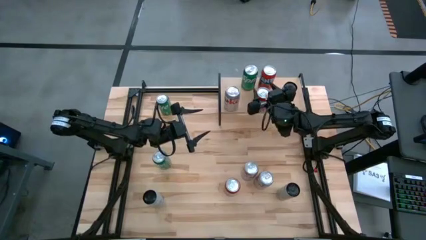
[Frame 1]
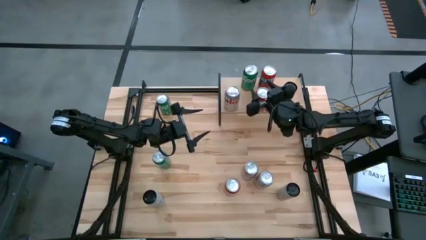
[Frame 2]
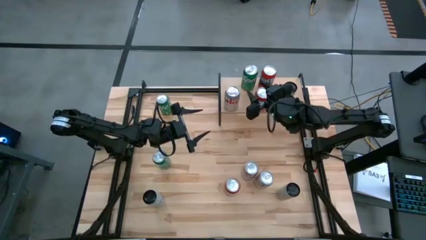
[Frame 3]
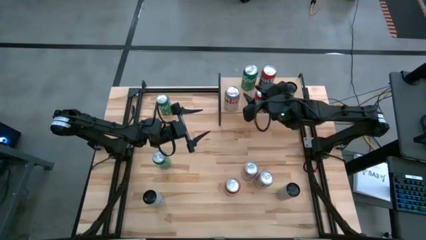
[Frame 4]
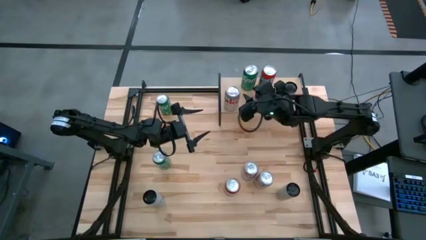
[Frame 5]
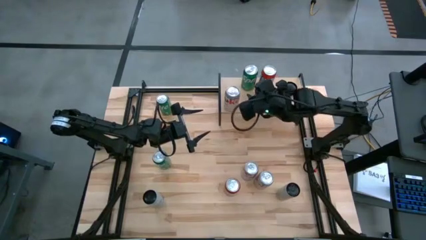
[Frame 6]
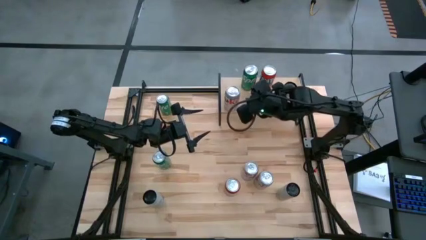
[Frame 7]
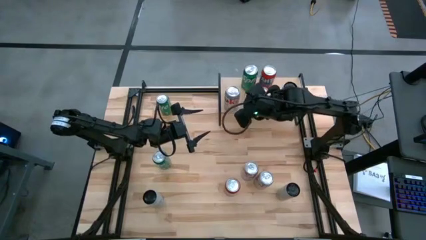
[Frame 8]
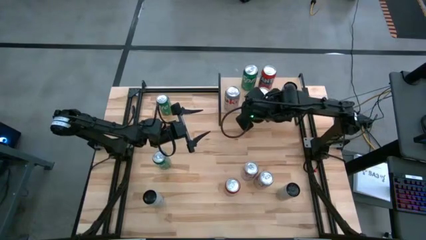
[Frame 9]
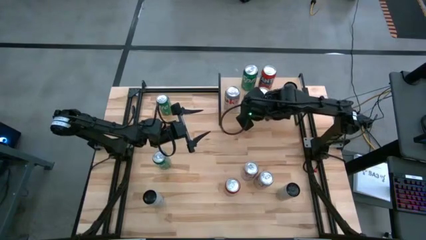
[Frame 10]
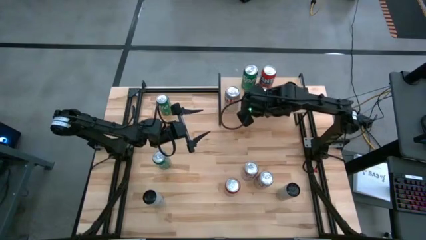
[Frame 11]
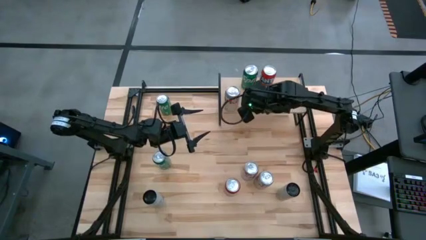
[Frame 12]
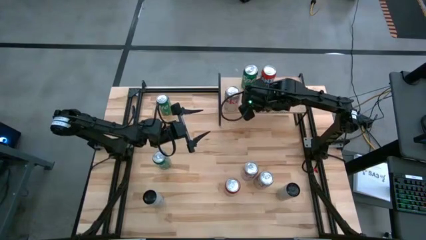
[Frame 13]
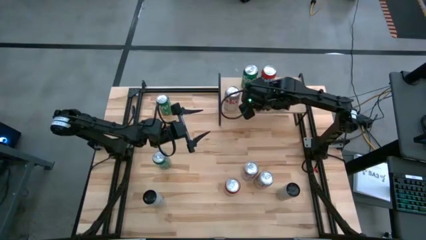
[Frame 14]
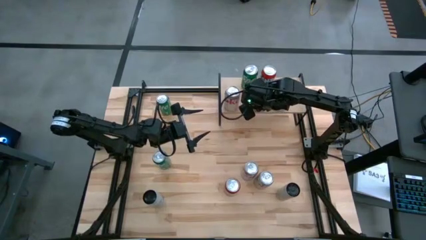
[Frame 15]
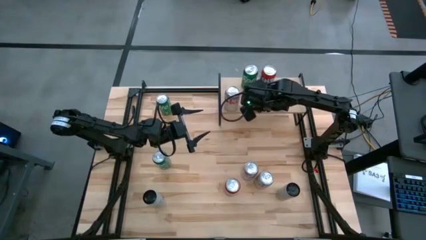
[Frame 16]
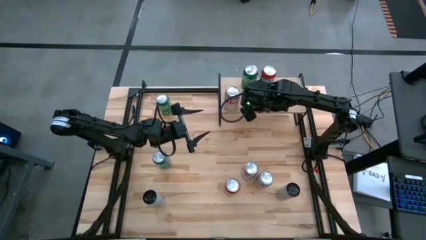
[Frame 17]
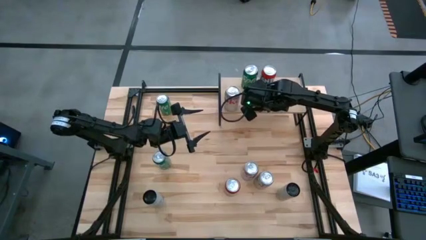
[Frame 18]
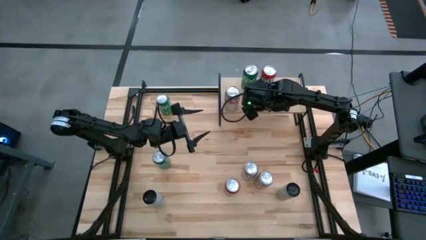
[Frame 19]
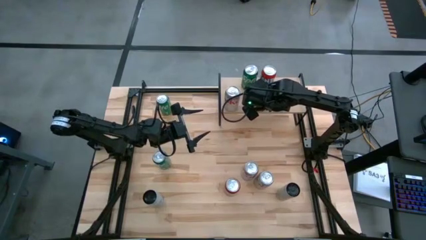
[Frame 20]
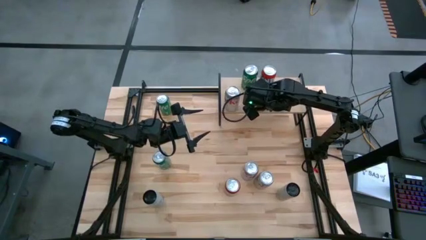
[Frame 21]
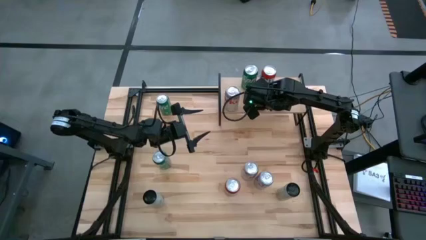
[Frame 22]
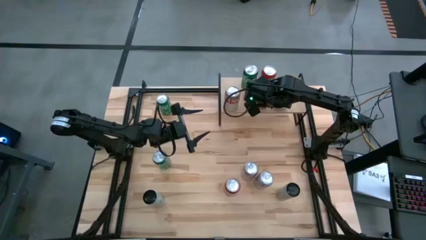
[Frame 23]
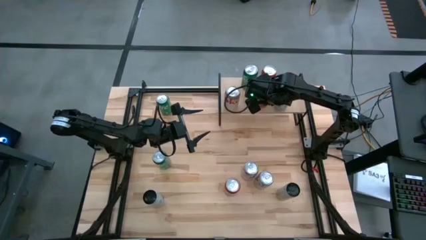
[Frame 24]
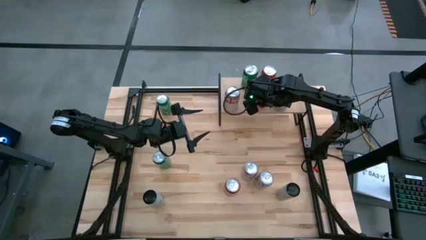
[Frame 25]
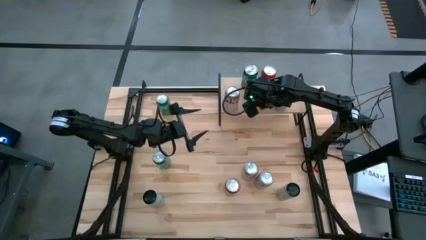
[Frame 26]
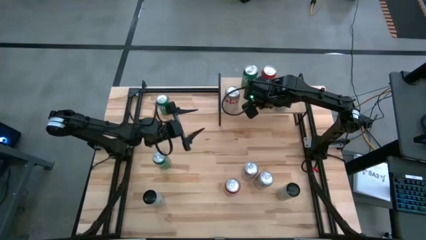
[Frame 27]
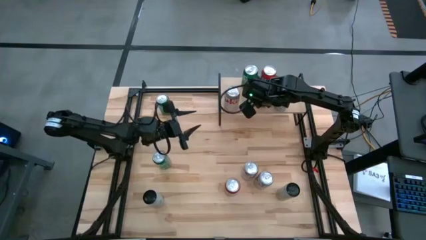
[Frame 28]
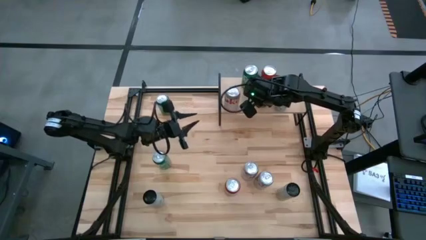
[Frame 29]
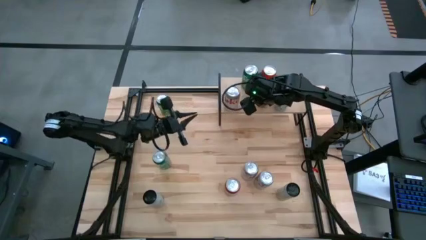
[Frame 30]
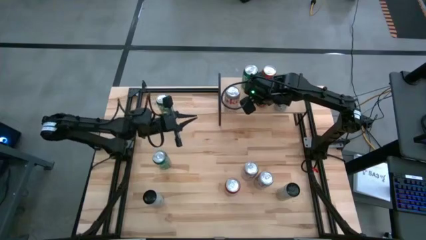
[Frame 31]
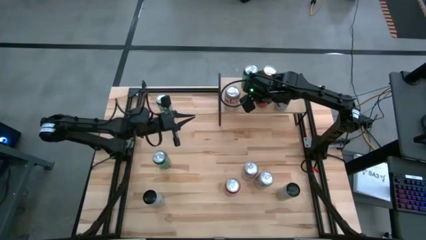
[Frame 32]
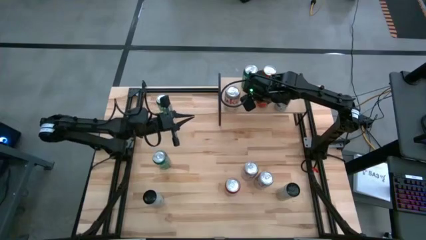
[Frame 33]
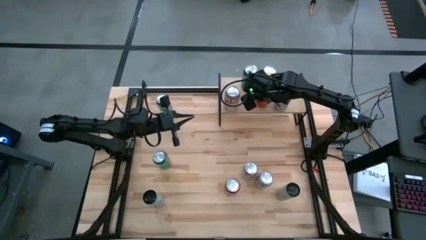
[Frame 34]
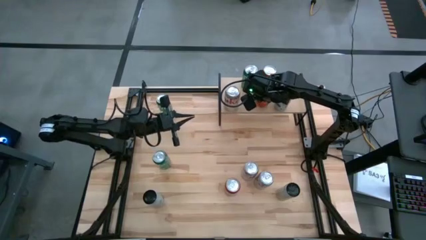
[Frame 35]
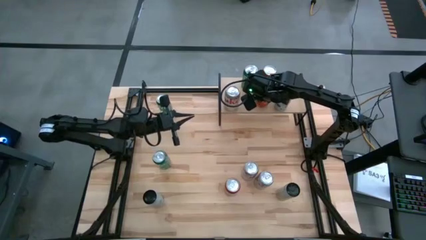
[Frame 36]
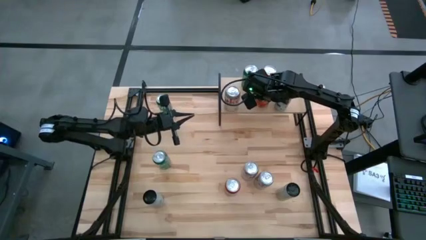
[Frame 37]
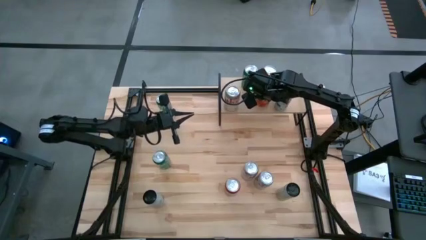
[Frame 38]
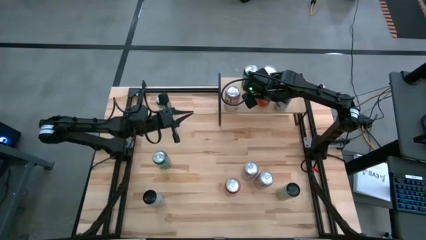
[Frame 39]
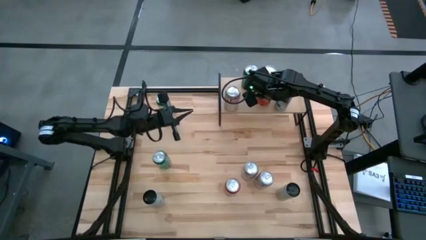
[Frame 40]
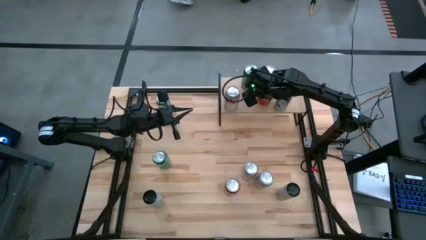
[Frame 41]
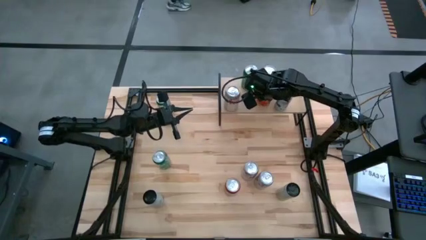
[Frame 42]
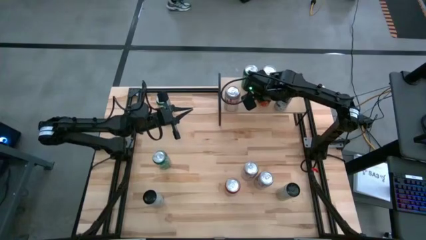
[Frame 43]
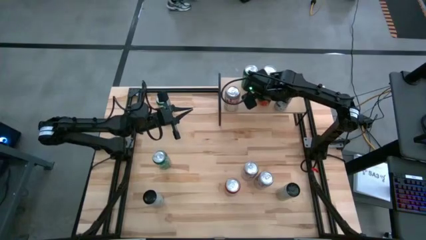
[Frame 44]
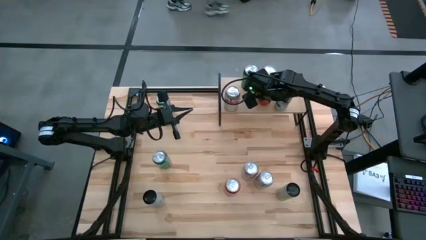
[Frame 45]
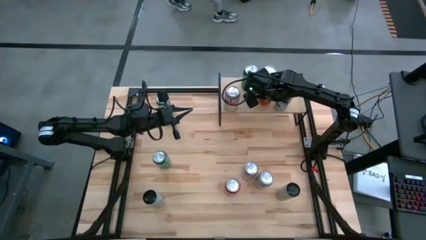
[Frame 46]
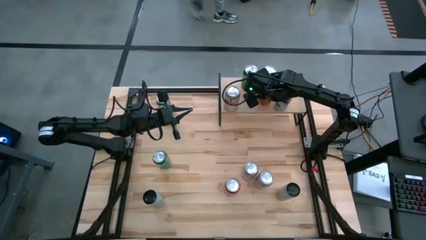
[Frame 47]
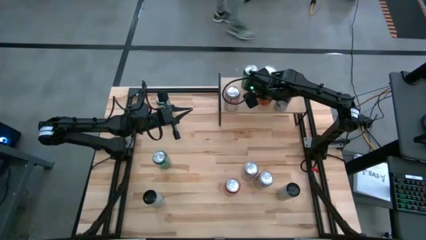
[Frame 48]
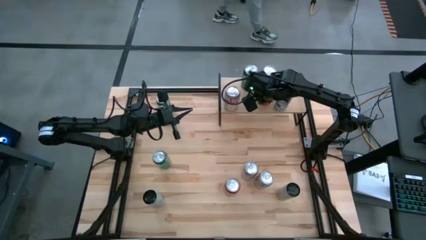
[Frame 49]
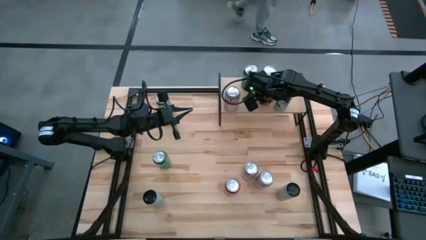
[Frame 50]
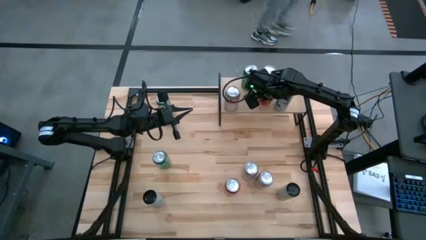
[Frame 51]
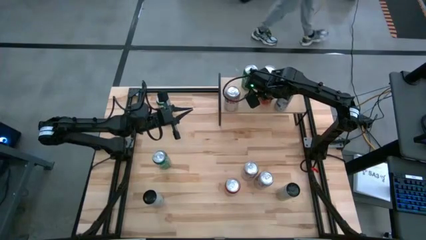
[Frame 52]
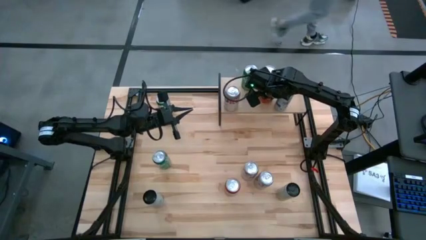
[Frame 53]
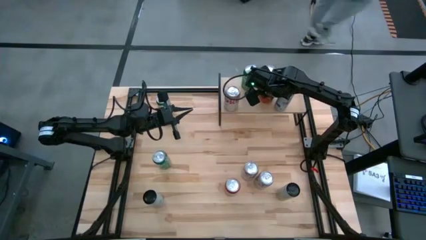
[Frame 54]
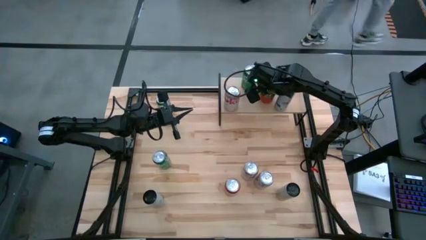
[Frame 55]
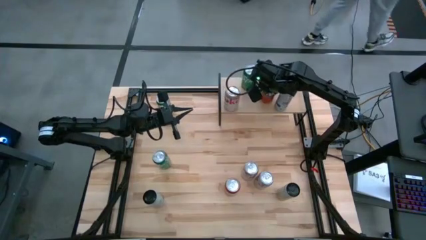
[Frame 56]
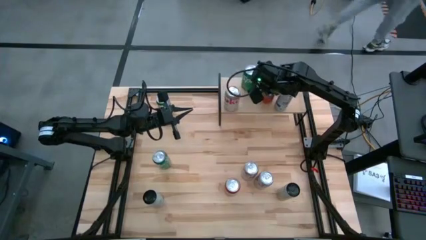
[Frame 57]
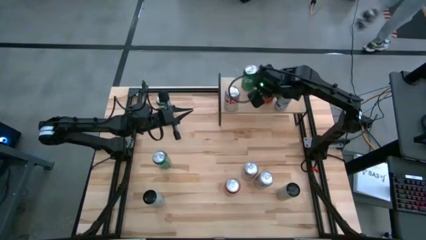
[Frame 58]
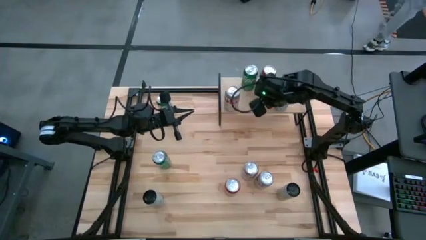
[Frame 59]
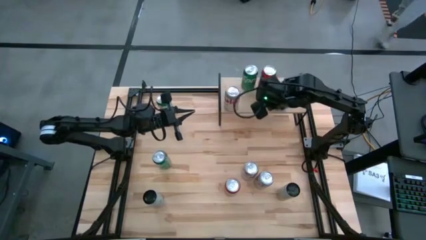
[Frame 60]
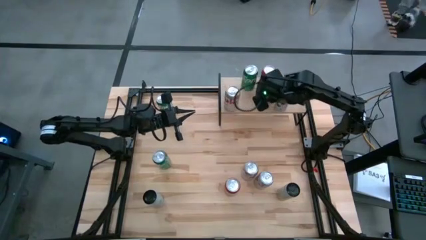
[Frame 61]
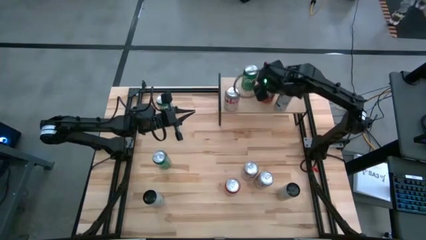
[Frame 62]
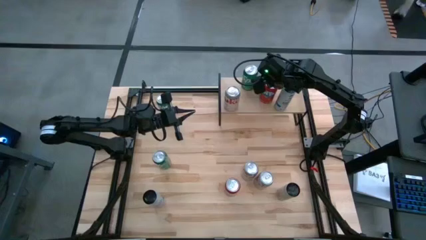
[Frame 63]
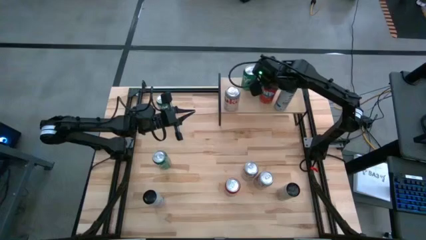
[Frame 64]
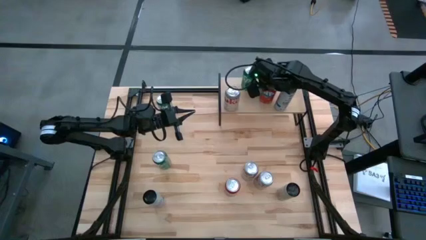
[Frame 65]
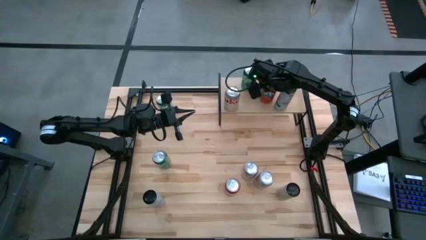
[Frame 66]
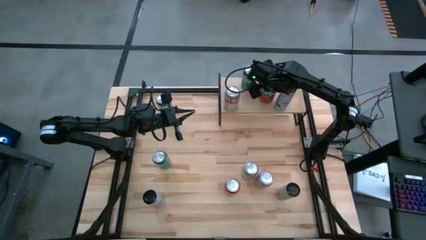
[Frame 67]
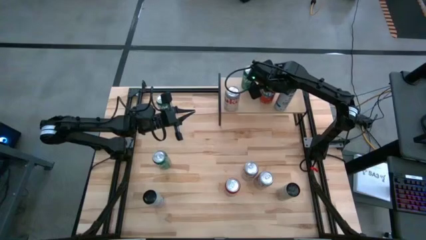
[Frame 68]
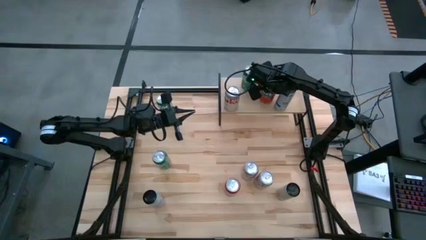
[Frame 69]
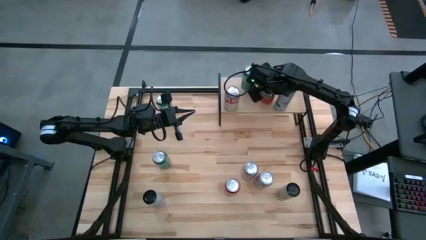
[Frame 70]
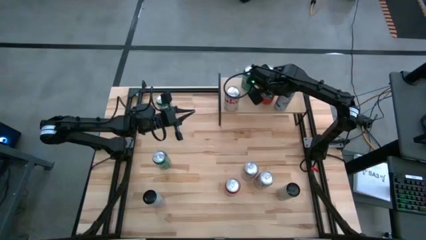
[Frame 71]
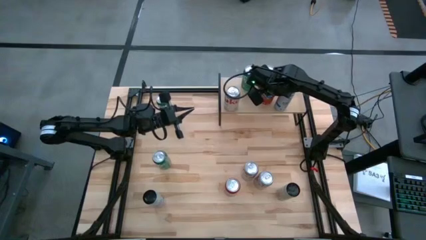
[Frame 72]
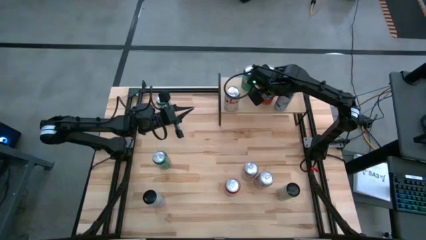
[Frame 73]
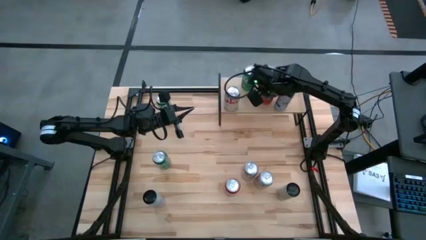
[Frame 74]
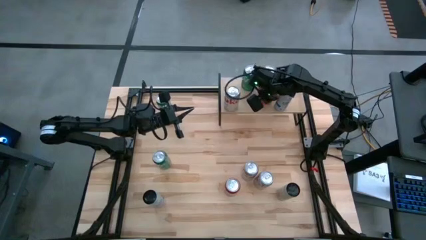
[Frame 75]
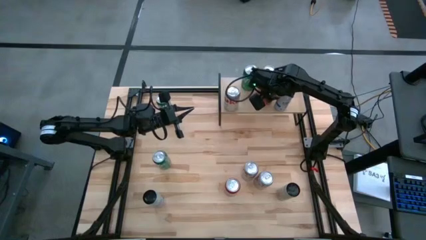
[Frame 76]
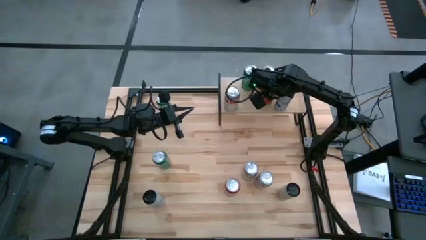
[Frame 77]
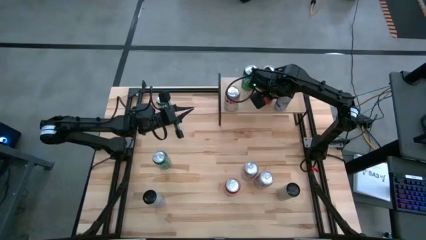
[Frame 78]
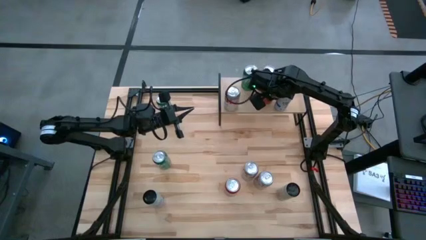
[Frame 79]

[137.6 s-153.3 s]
Task: Place canned beverage on shelf
Put the top orange soda can on the shelf aligned in front of the other orange soda can
